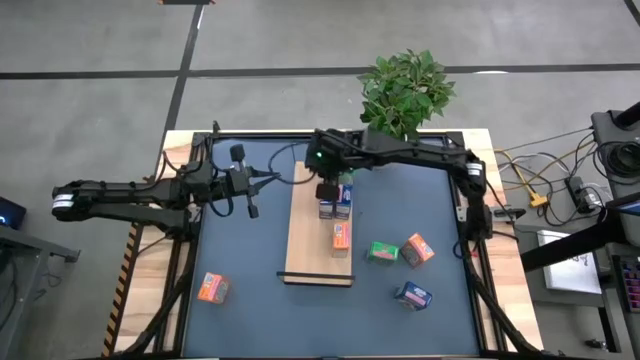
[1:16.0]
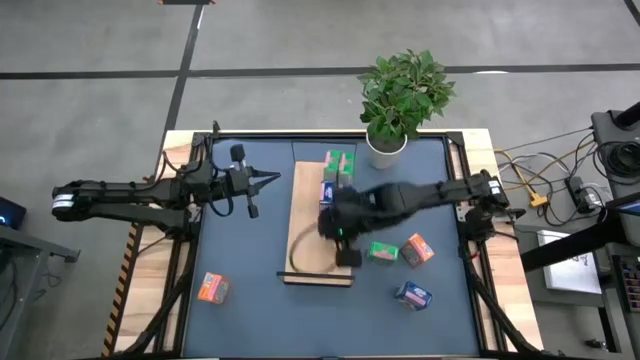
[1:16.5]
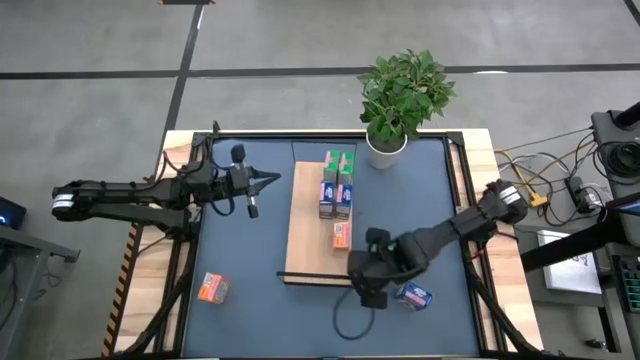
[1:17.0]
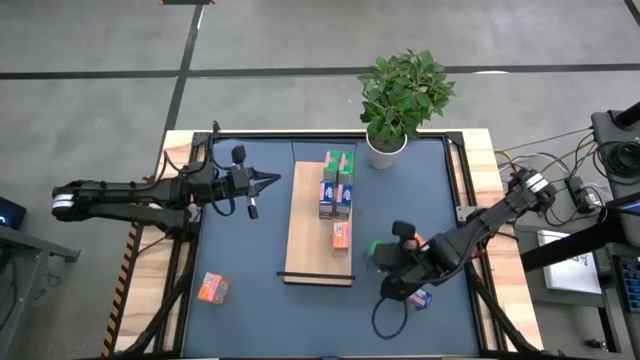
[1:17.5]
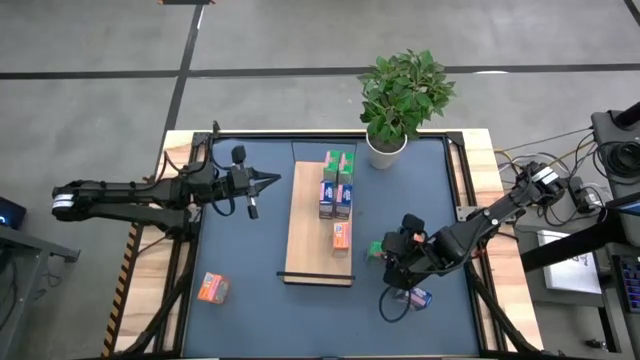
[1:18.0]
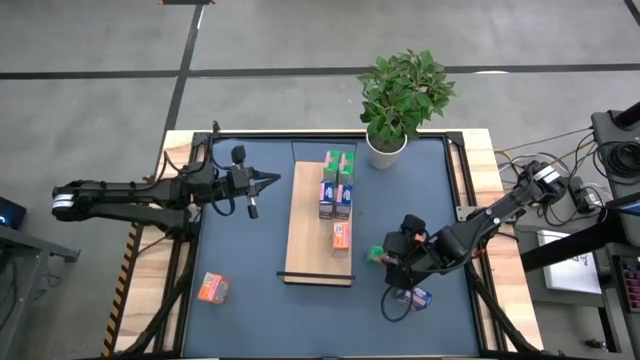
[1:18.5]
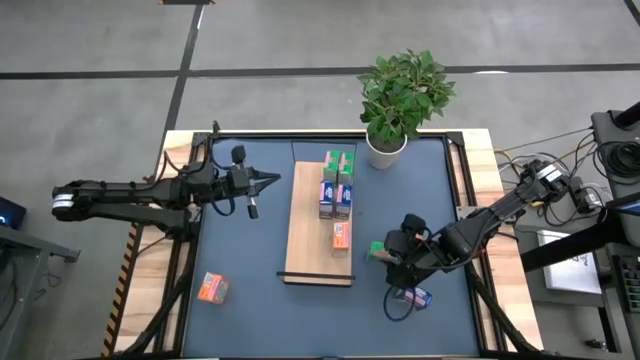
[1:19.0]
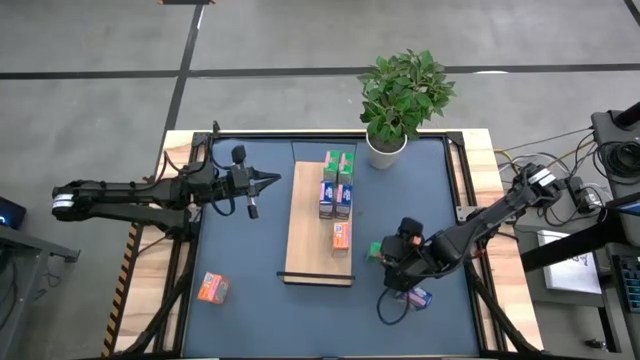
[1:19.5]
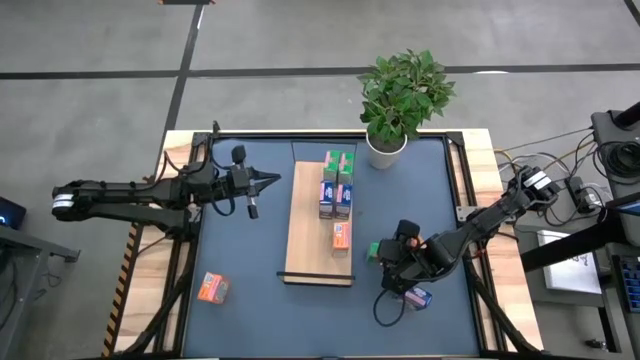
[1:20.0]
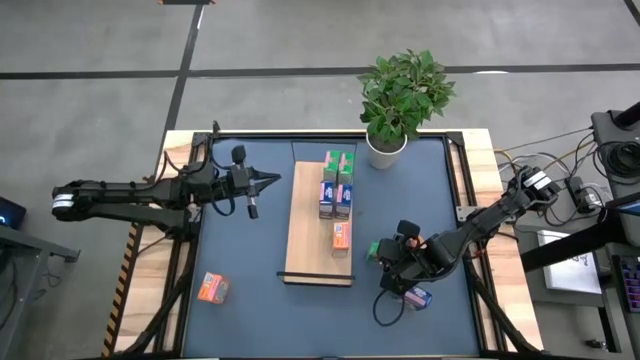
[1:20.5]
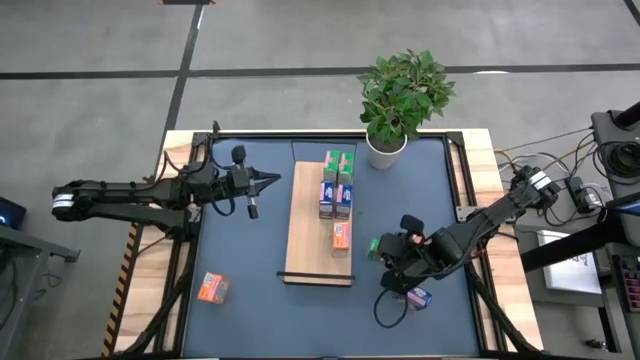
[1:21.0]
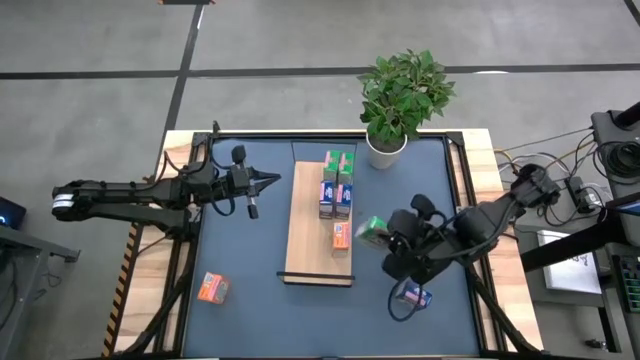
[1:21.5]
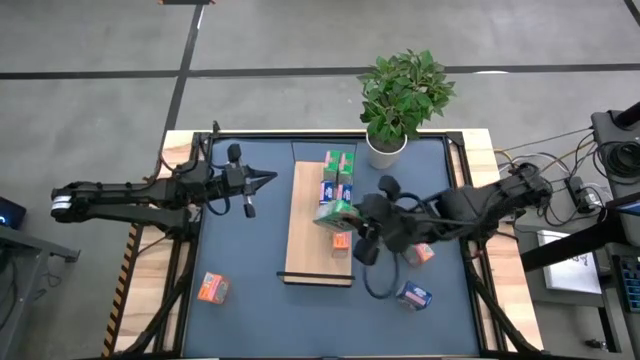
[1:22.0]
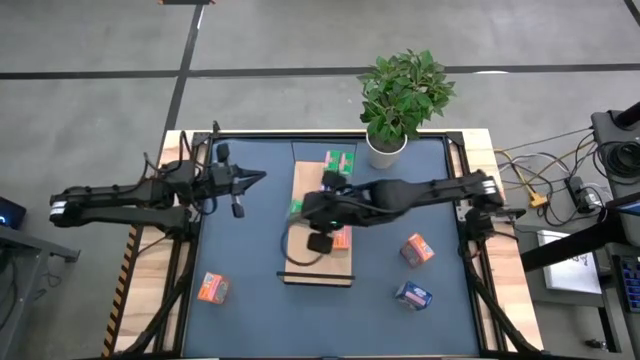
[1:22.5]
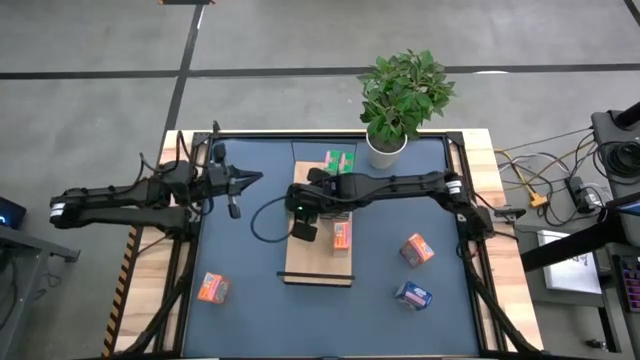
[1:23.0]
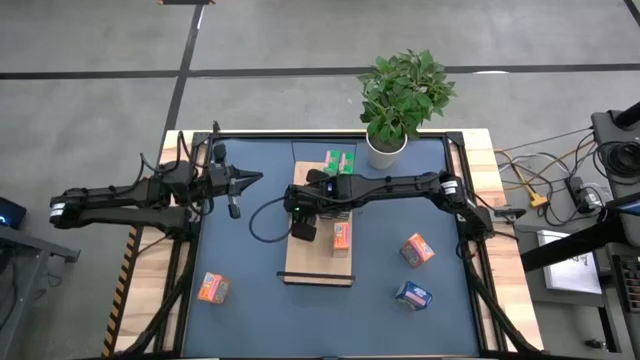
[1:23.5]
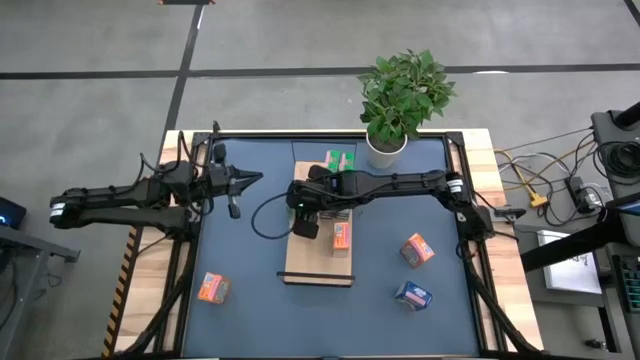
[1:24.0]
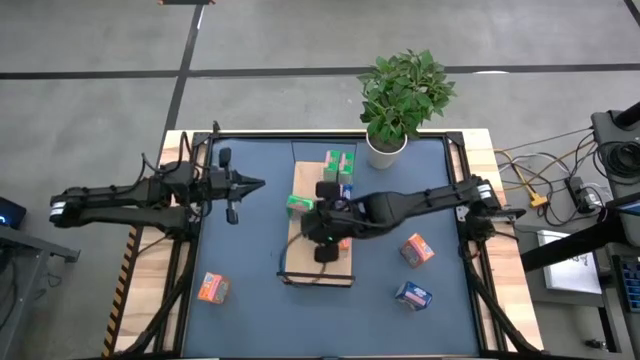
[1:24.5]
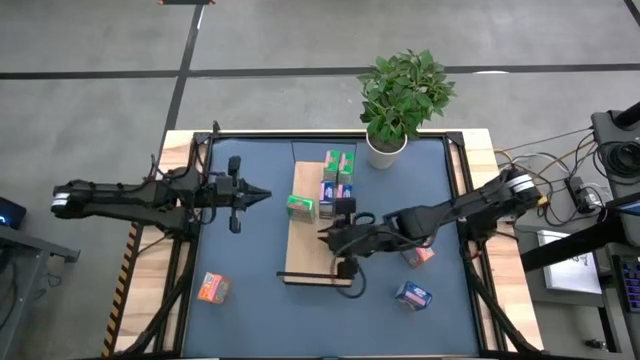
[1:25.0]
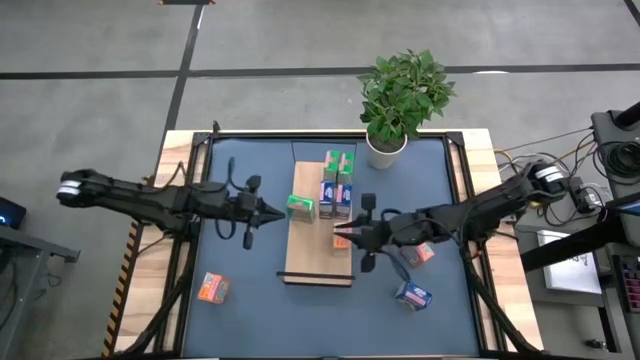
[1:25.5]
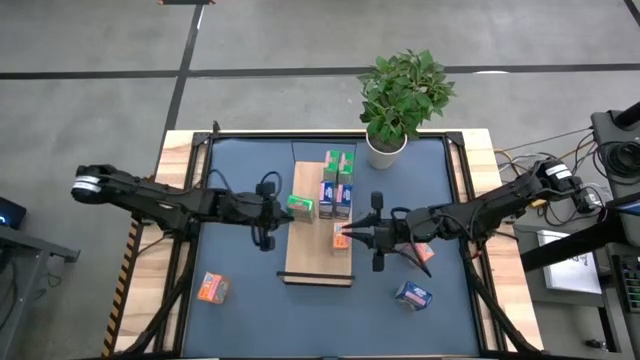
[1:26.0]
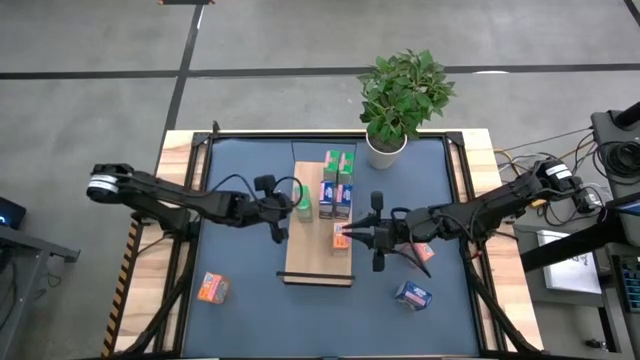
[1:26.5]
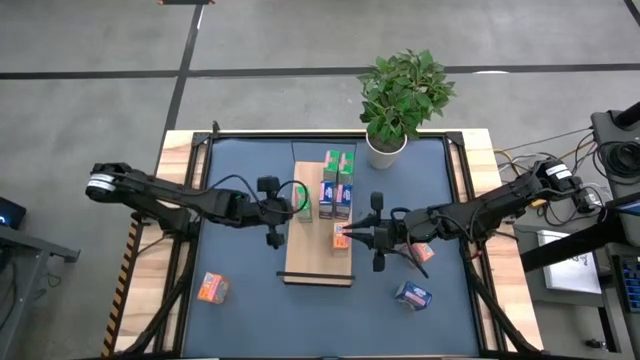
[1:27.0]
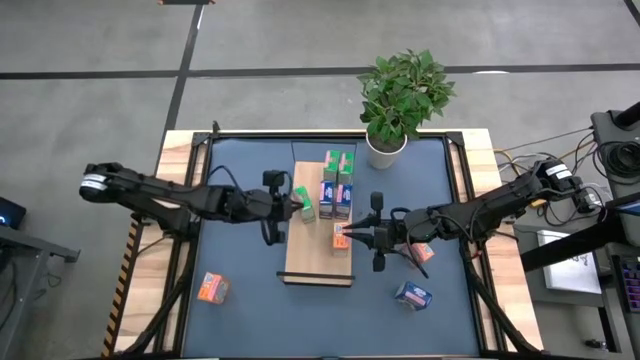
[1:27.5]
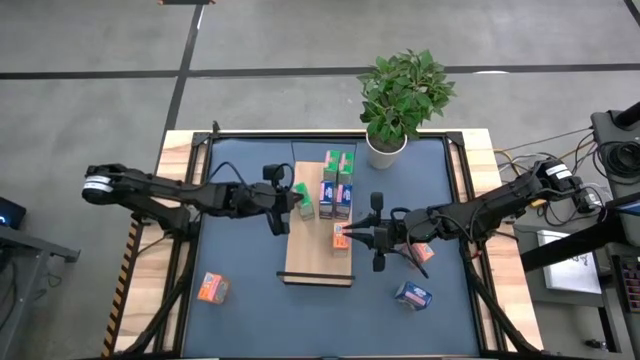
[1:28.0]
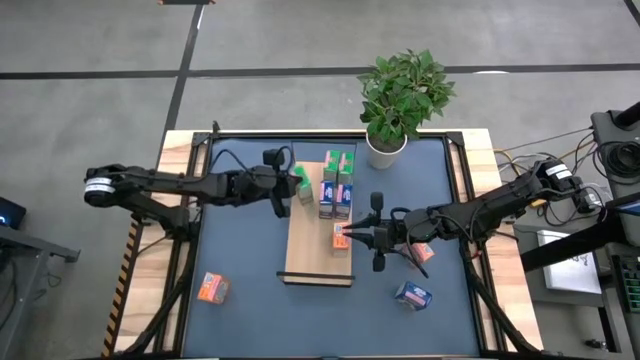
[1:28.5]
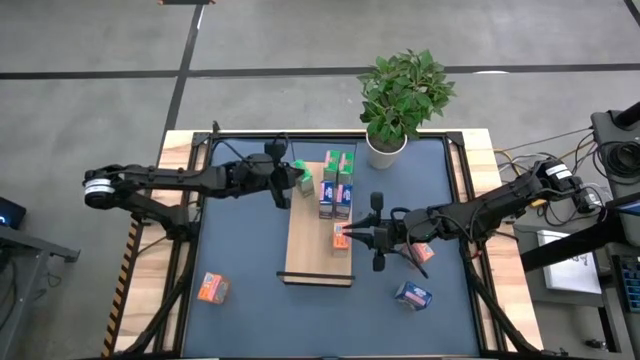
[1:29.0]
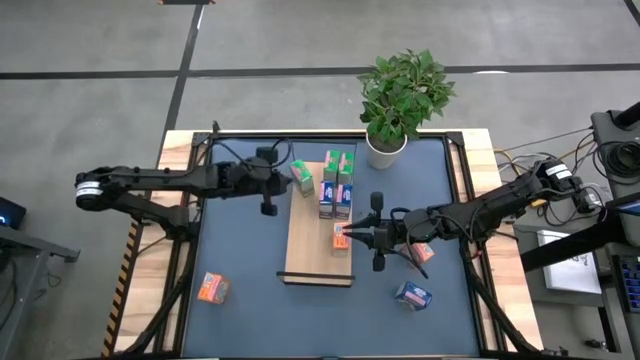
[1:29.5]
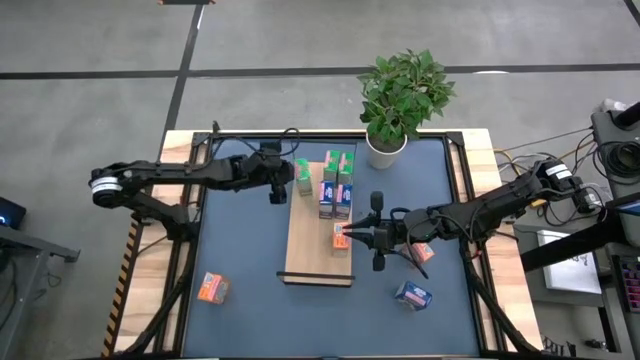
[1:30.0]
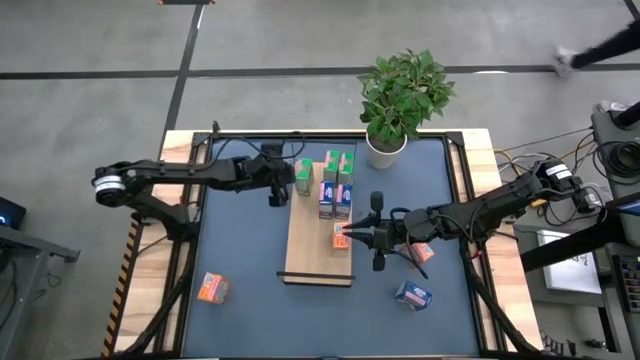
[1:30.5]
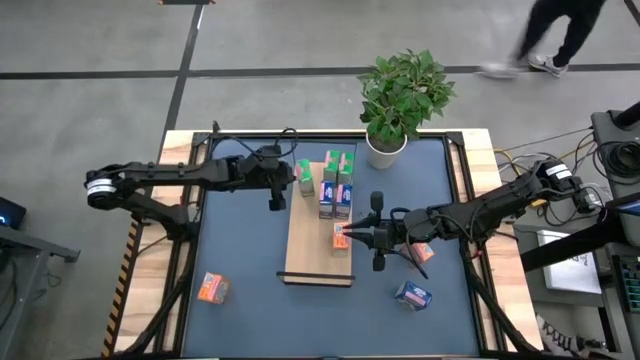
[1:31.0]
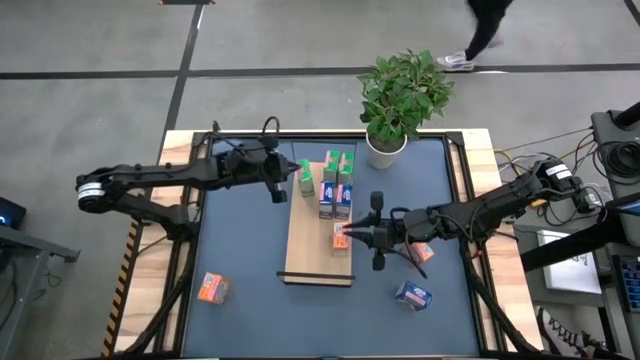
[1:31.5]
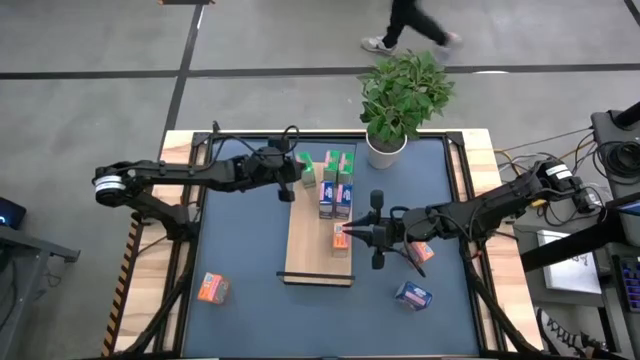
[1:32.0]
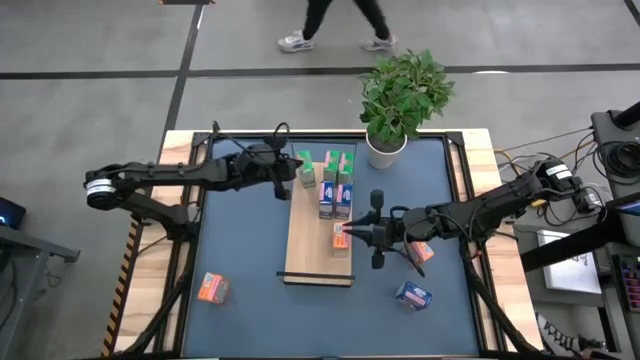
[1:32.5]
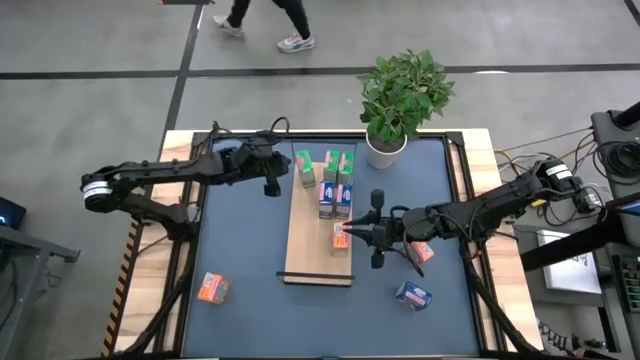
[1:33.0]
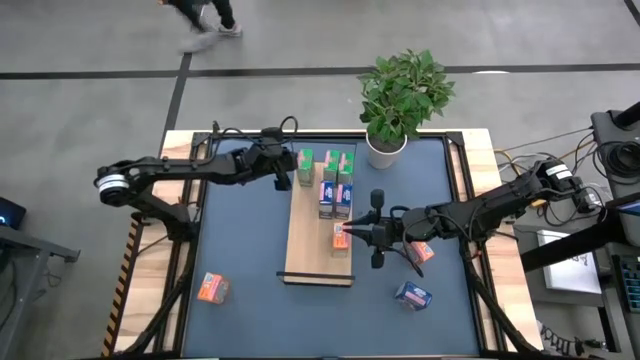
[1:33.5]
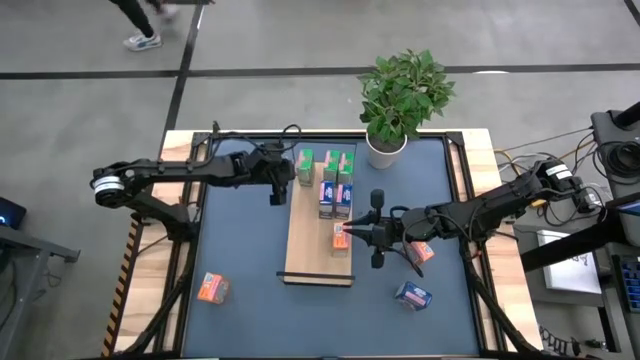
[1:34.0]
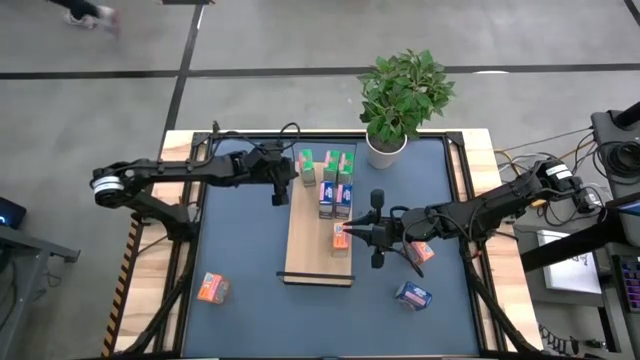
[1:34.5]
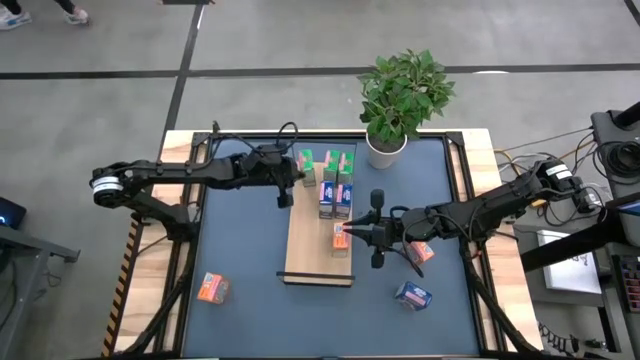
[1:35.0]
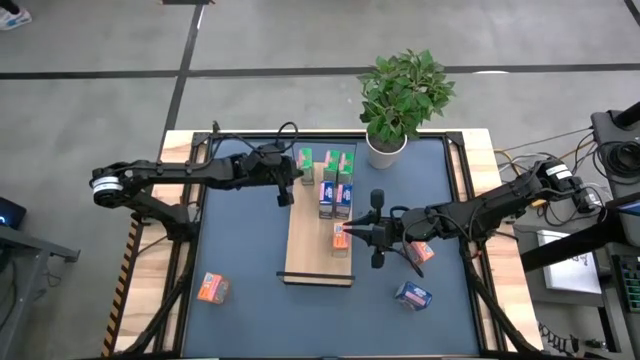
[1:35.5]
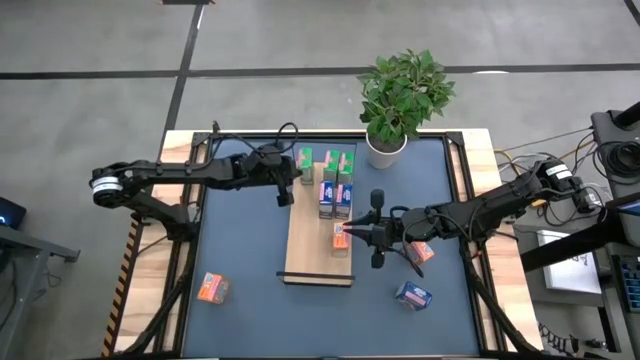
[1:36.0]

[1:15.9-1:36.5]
Task: Stack cereal on shelf
Put the green cereal box on the shelf aligned with the other green cereal box
